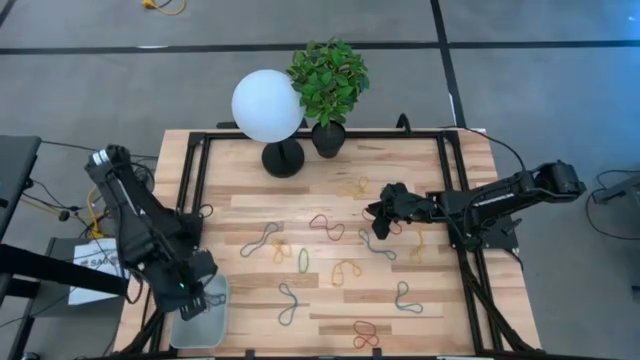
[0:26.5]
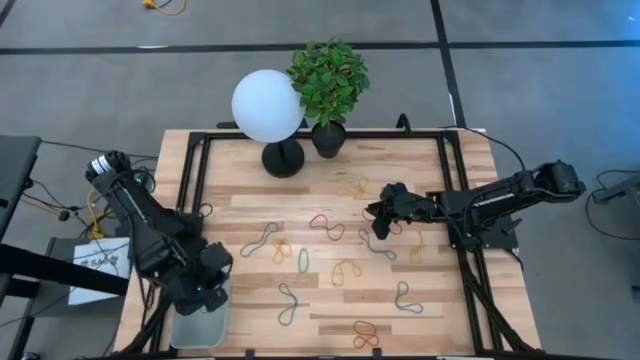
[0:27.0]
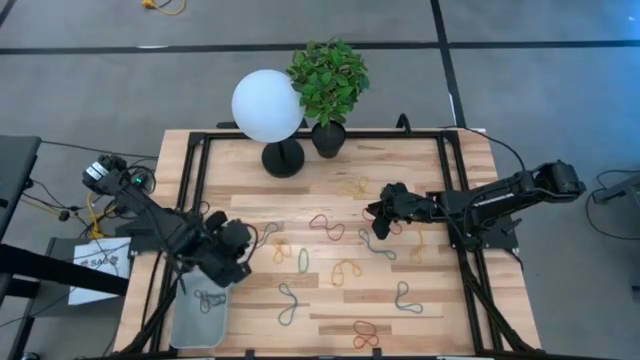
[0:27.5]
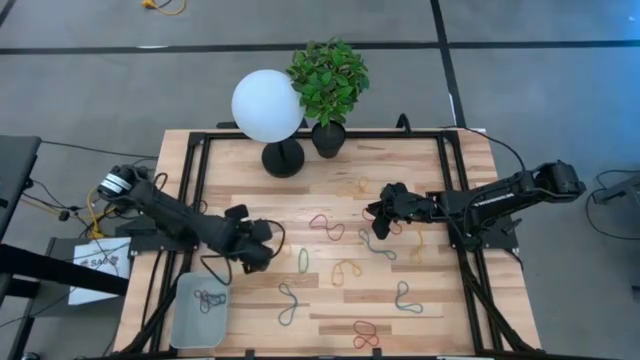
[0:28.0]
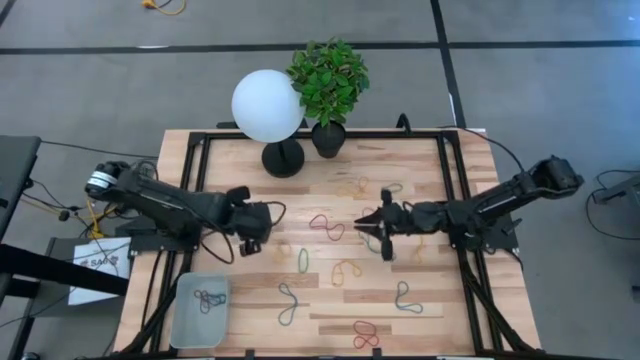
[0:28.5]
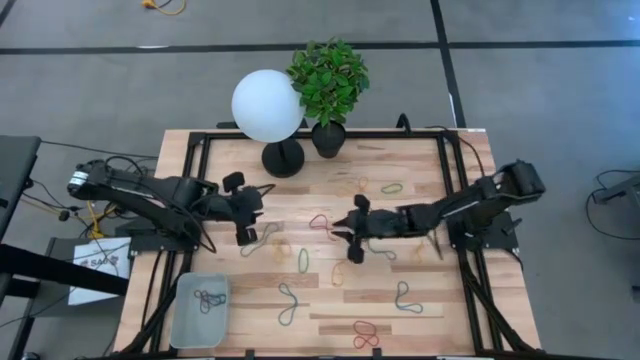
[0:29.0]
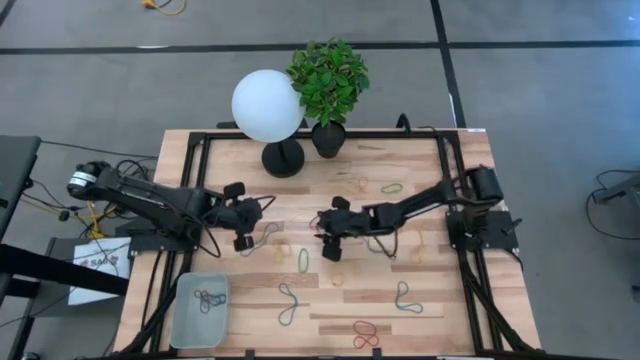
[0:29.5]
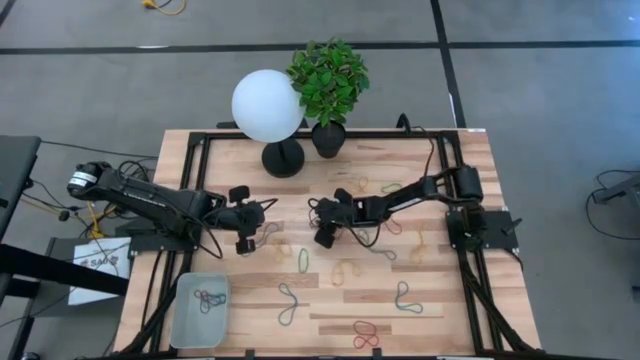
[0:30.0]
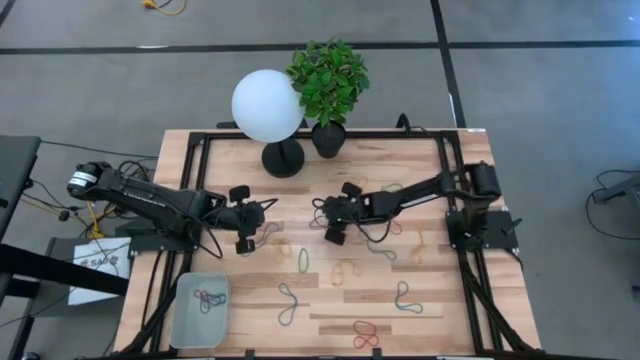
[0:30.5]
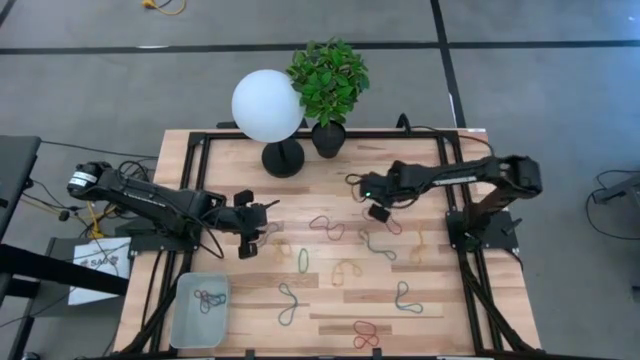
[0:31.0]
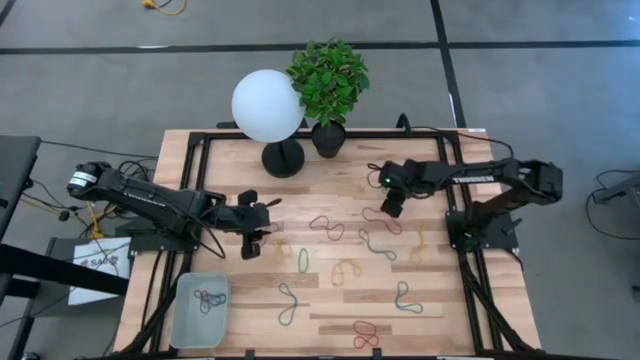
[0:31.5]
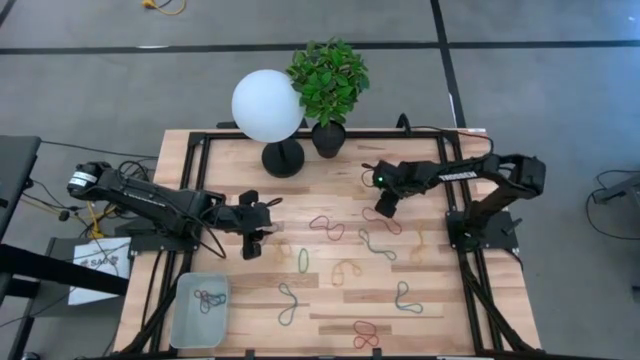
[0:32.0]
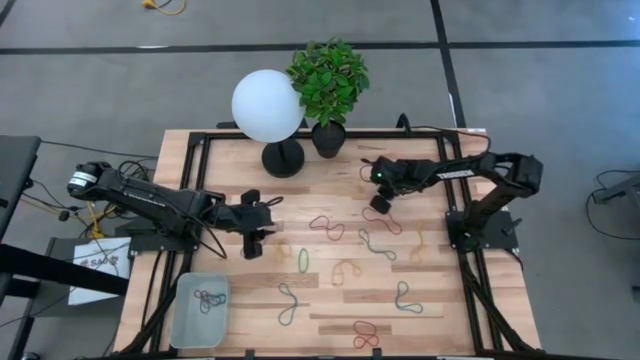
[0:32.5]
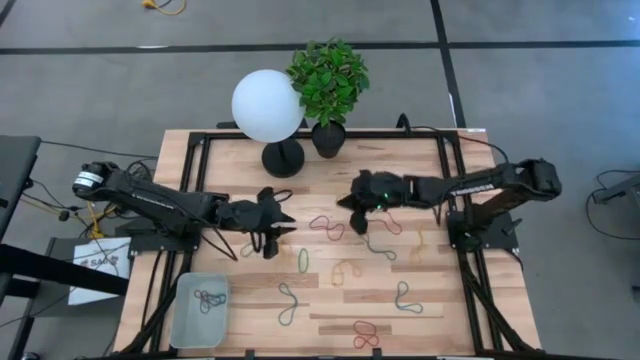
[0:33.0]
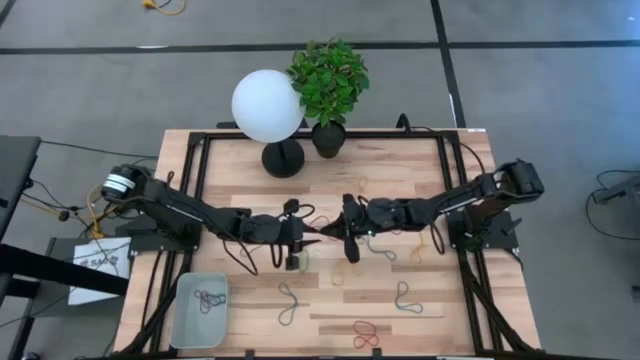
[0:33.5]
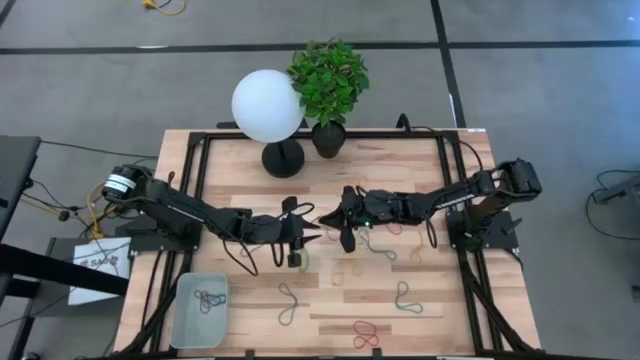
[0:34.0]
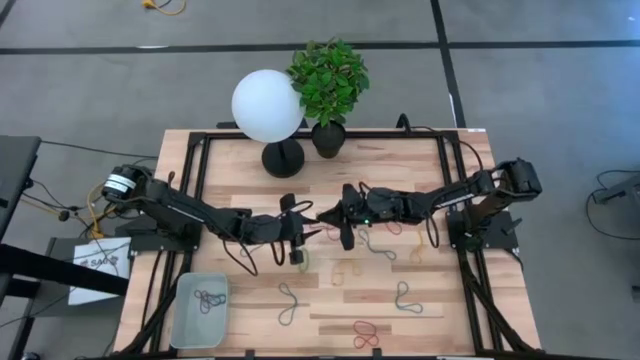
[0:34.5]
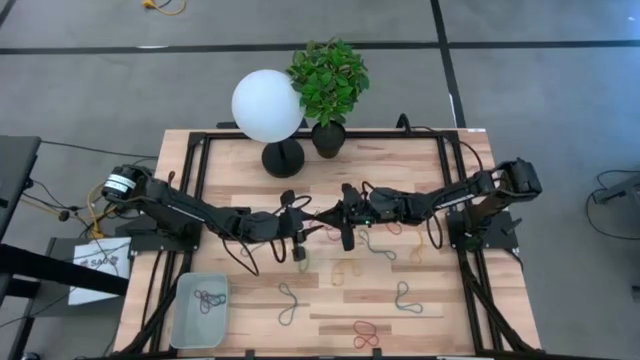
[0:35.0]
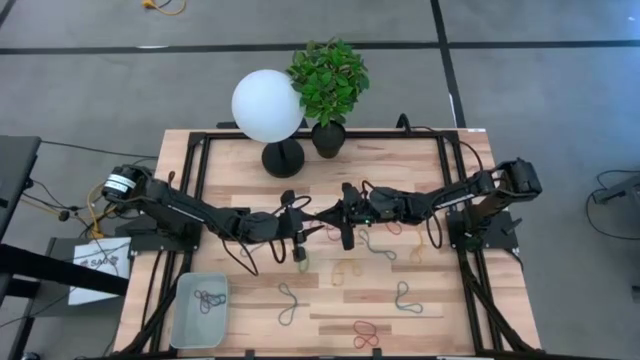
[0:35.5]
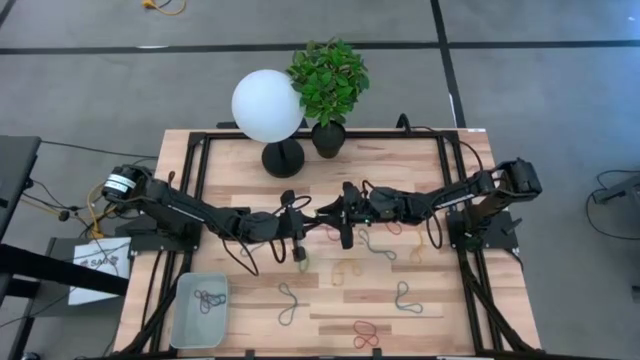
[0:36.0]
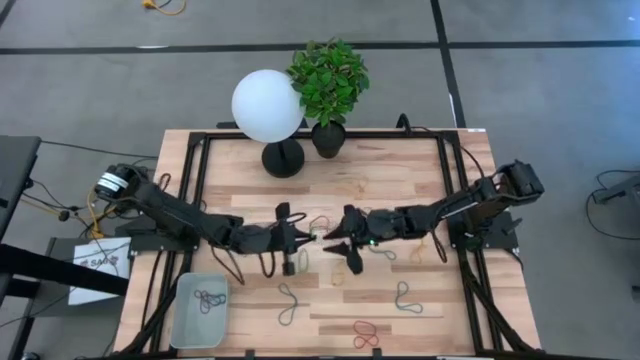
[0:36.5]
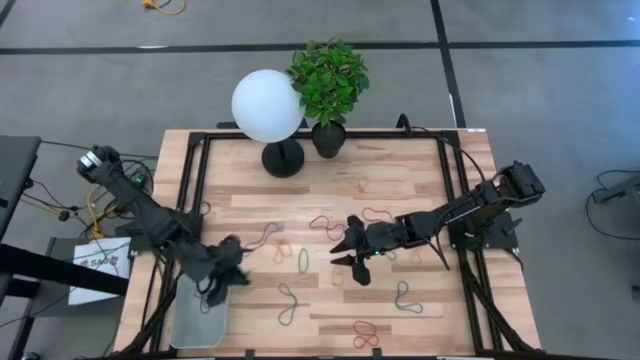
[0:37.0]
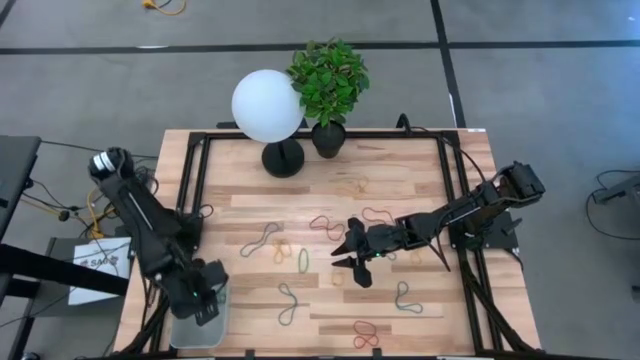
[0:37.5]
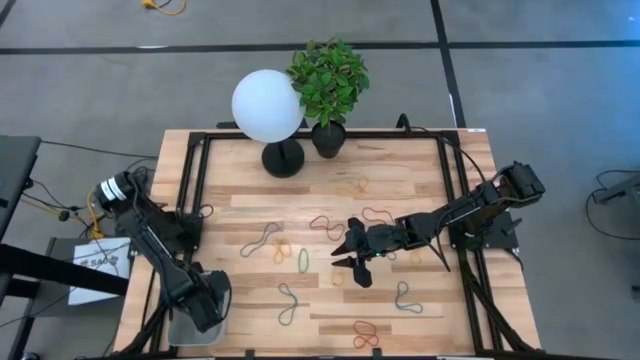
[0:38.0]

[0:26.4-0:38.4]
Task: Pick and place items into bin
Put the right green rubber band into the gray bin

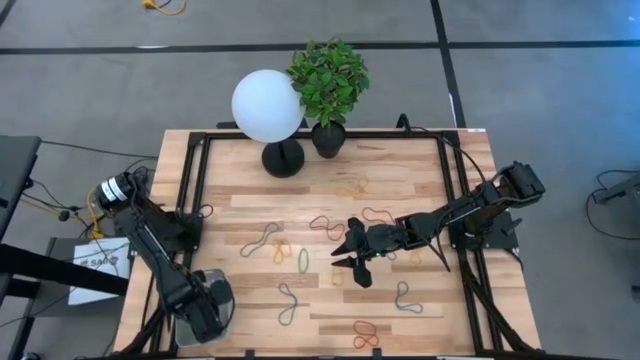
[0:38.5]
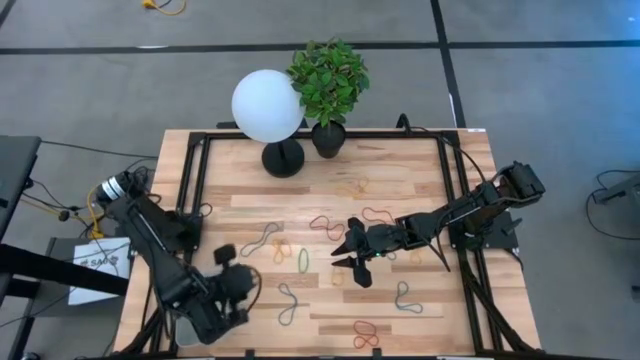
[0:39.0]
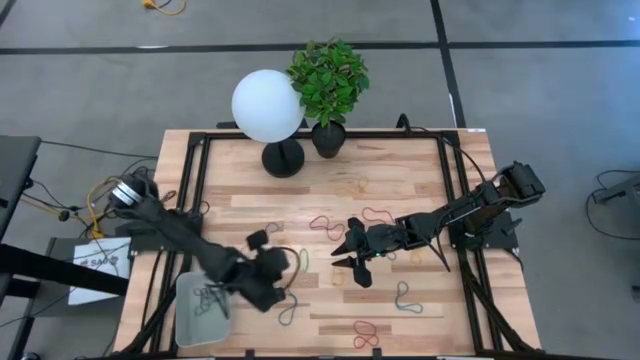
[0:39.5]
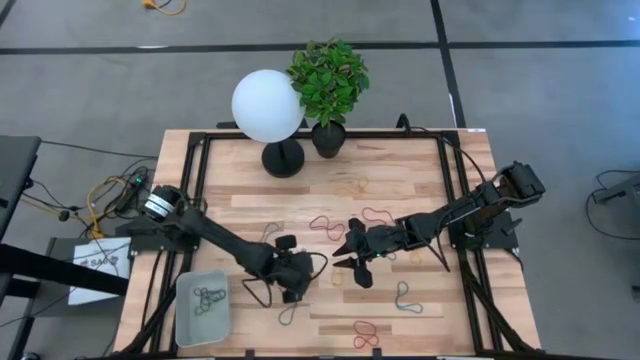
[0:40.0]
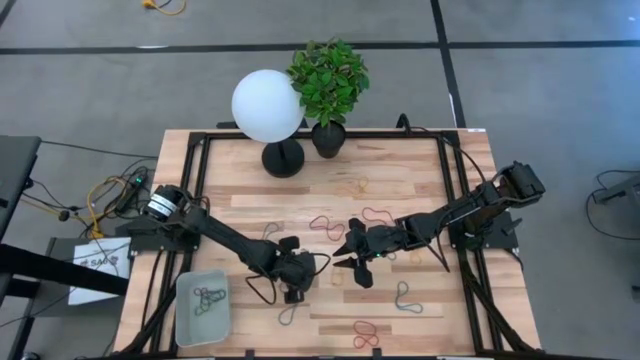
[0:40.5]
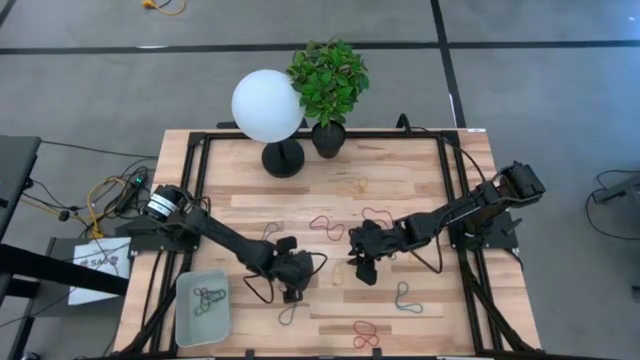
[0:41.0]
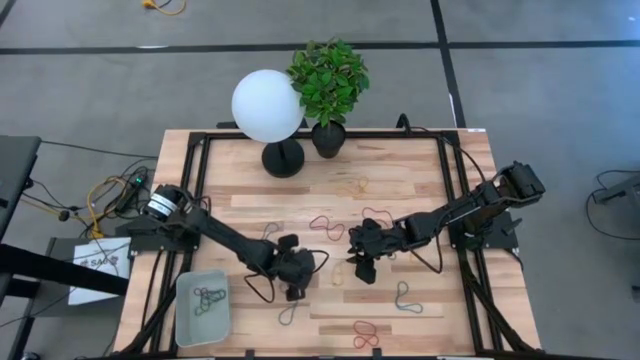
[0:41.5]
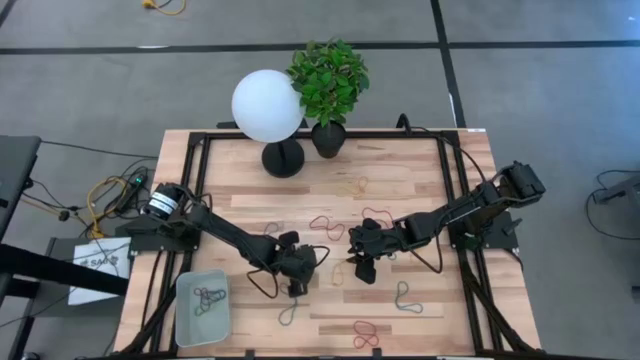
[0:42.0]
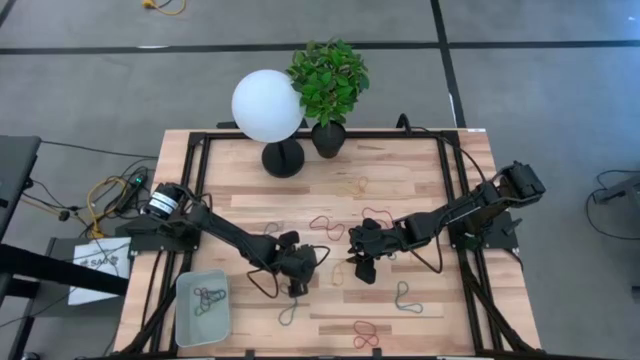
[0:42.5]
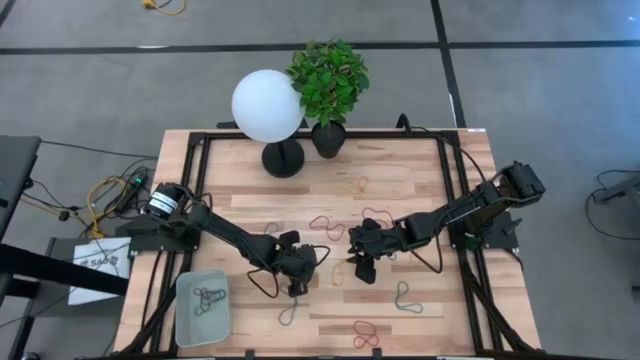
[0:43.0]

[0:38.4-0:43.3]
Put the green rubber band into the gray bin

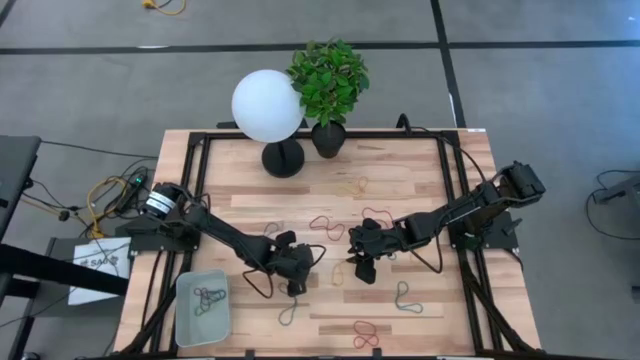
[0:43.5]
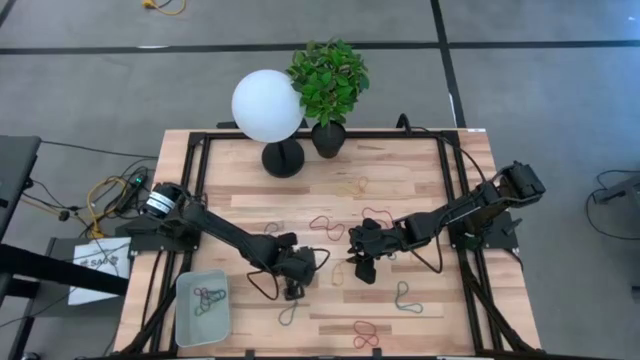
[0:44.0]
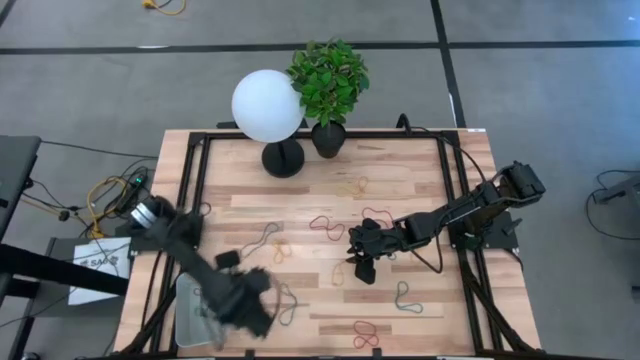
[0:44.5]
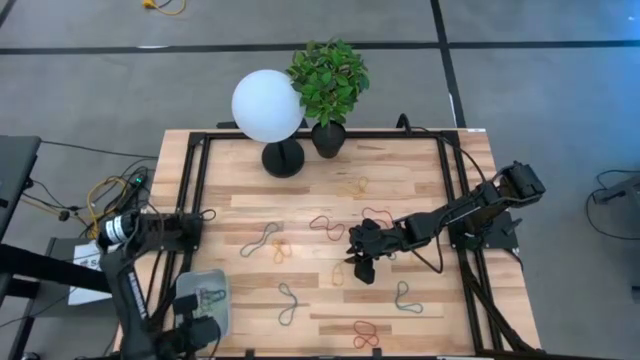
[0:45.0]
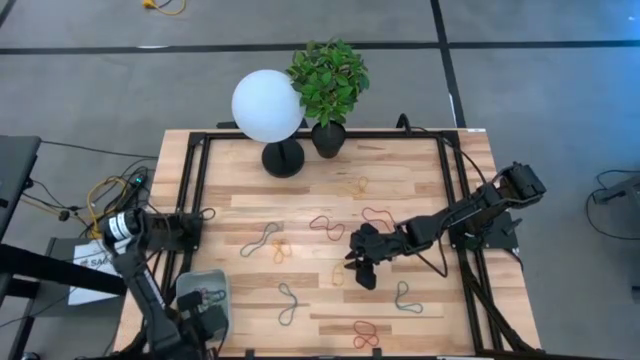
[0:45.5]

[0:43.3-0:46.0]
Put the green rubber band into the gray bin

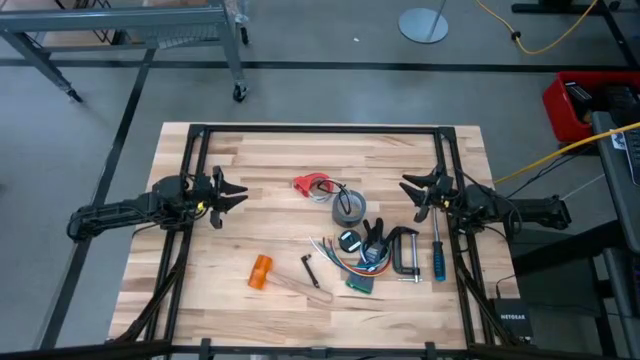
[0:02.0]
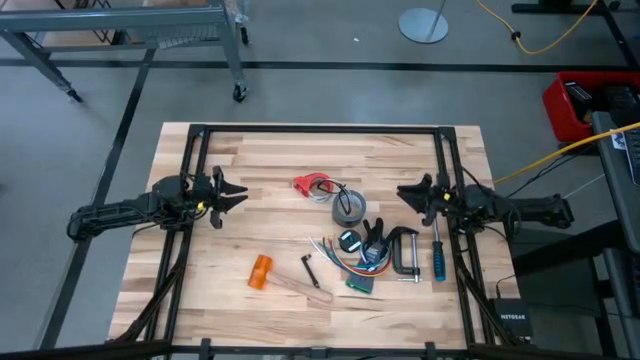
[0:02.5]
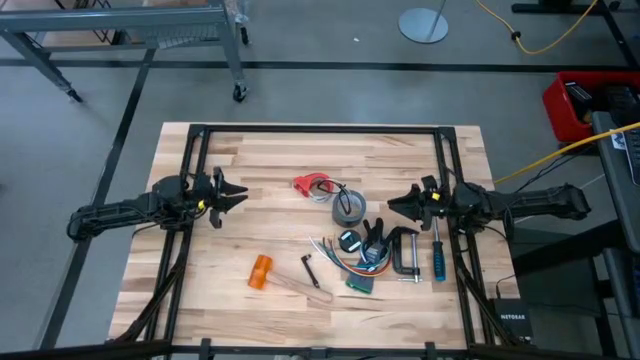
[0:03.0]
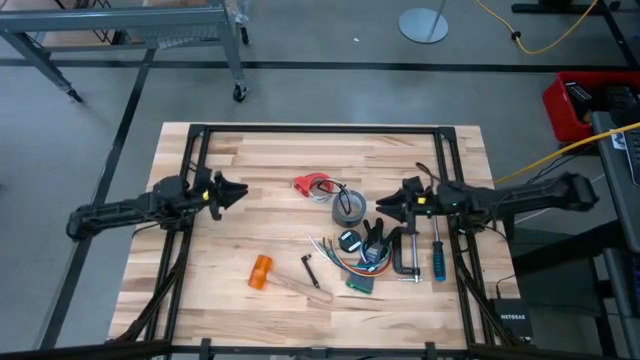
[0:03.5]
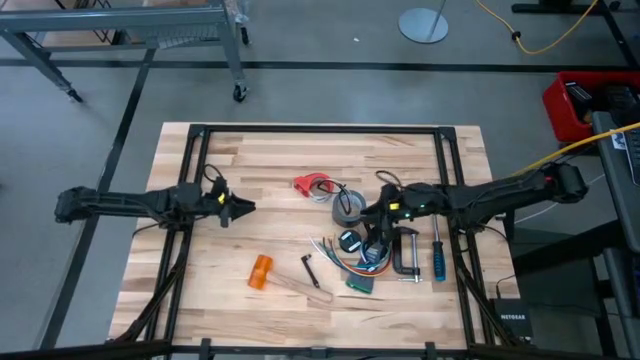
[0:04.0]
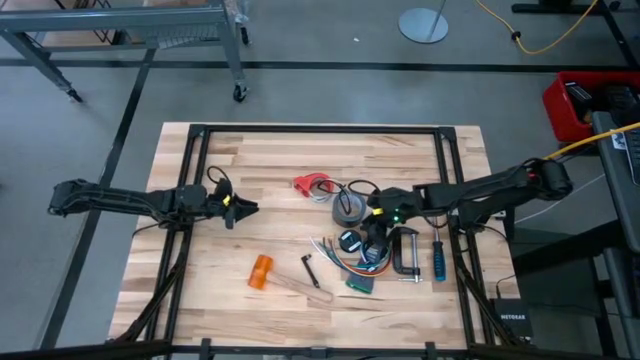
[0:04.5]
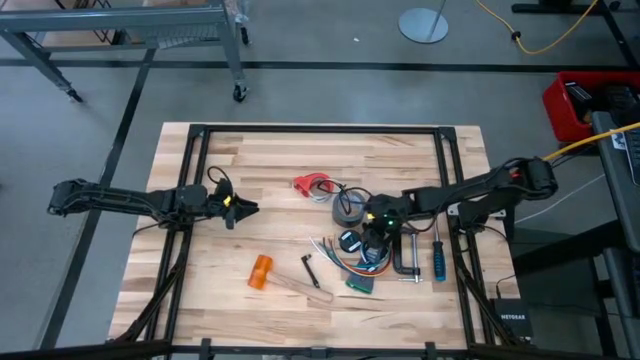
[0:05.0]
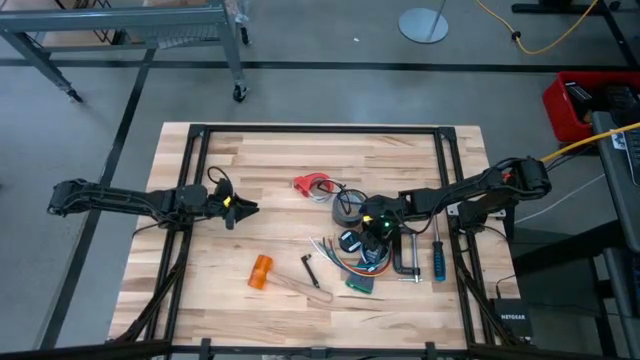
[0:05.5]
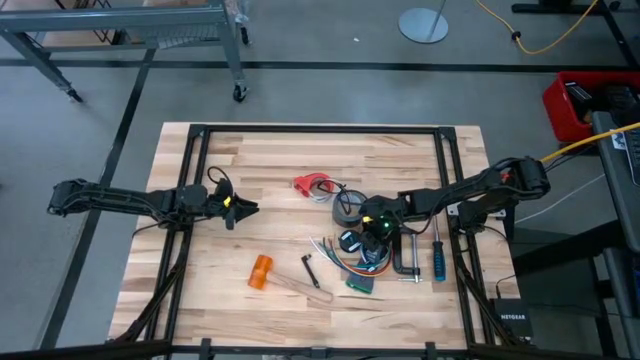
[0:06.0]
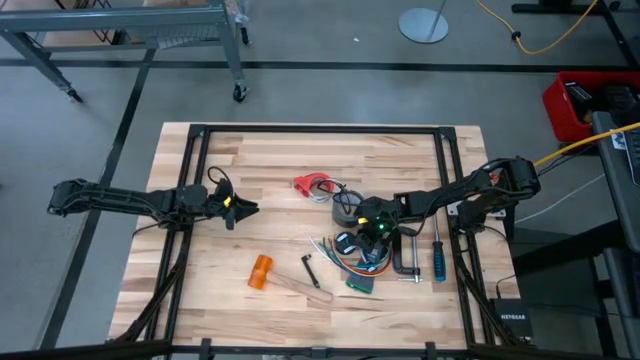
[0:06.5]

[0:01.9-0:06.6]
Task: Coil cords
Uncoil the blue wire from the spool
